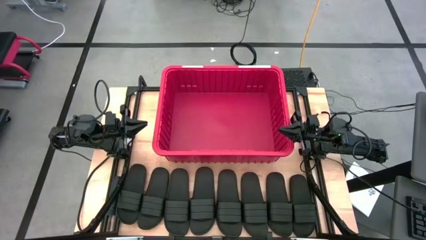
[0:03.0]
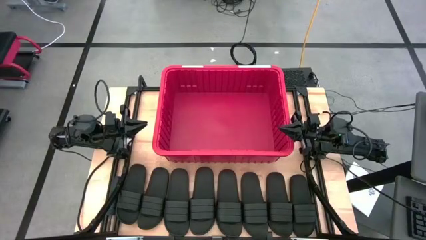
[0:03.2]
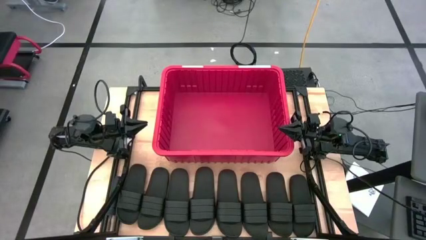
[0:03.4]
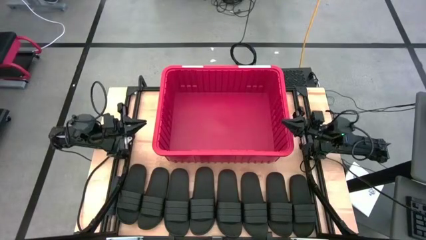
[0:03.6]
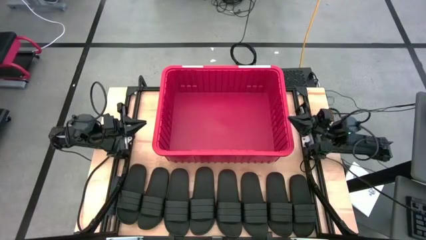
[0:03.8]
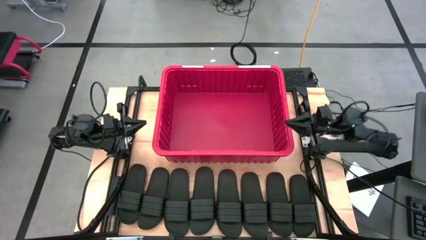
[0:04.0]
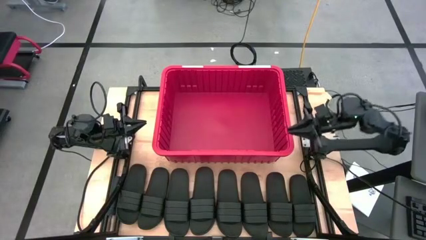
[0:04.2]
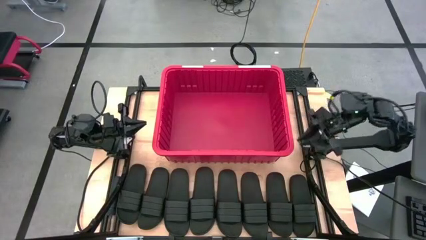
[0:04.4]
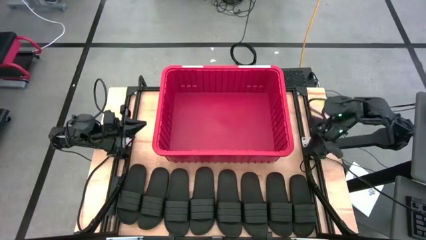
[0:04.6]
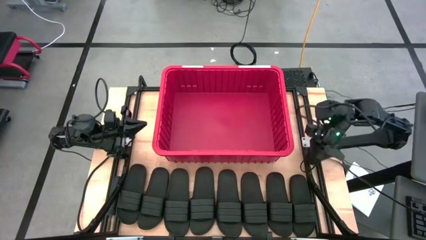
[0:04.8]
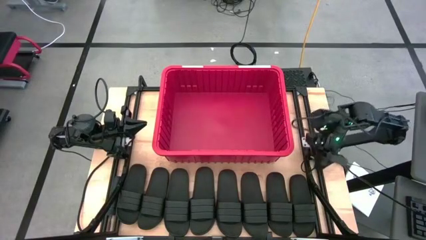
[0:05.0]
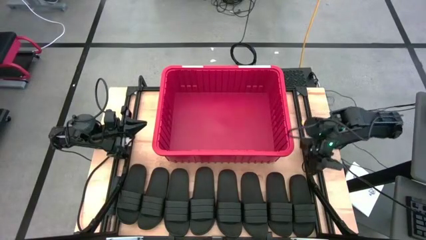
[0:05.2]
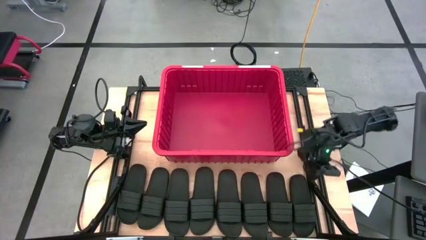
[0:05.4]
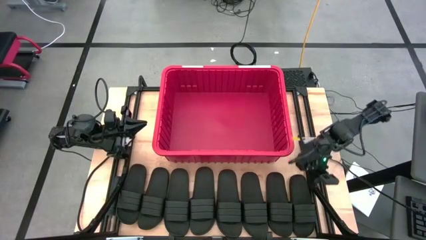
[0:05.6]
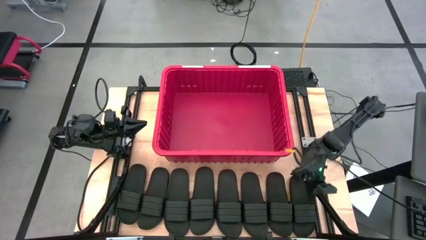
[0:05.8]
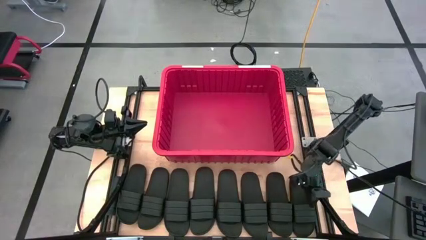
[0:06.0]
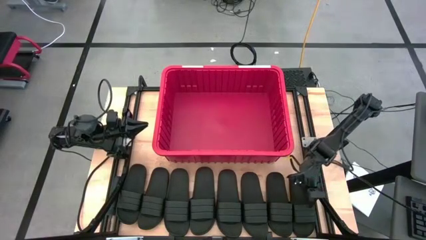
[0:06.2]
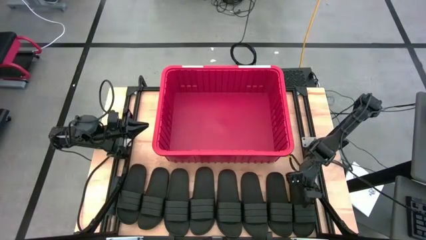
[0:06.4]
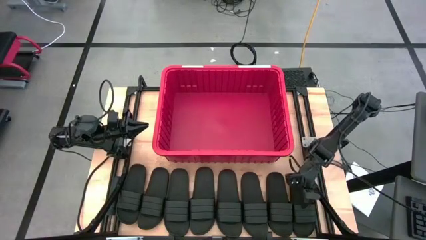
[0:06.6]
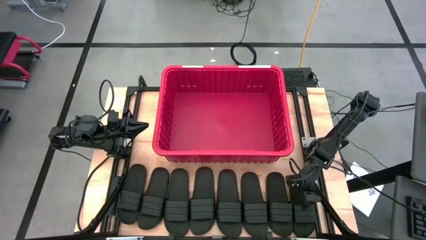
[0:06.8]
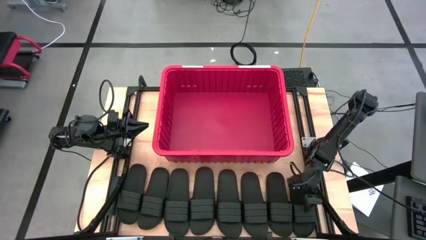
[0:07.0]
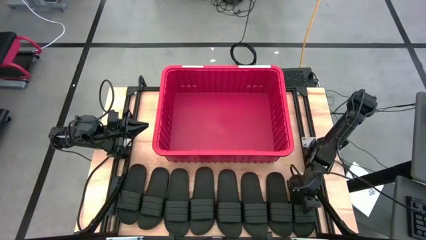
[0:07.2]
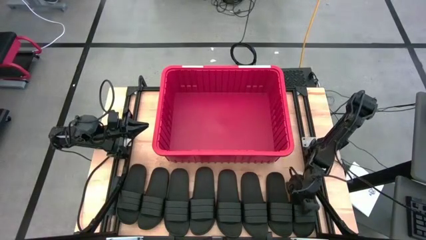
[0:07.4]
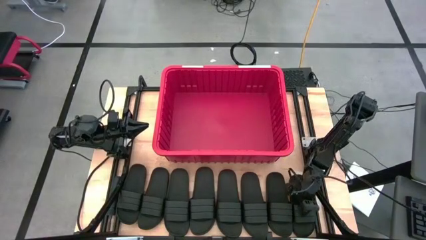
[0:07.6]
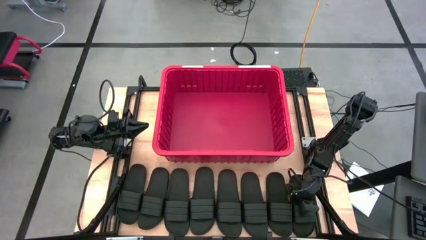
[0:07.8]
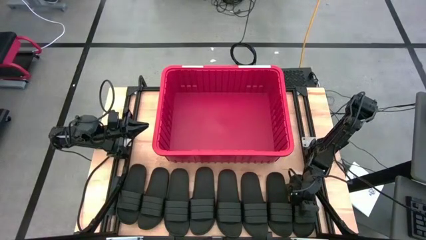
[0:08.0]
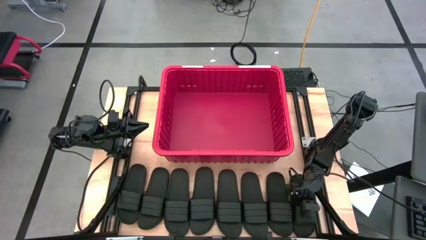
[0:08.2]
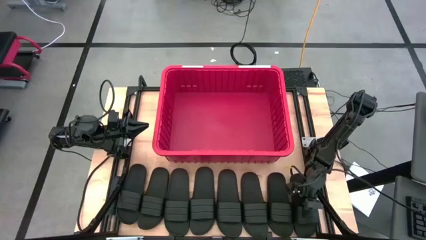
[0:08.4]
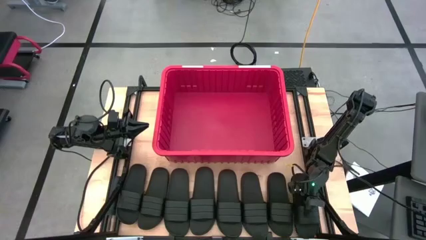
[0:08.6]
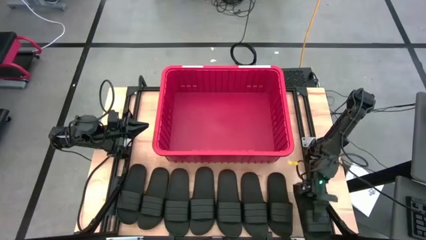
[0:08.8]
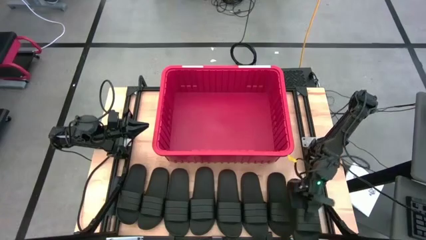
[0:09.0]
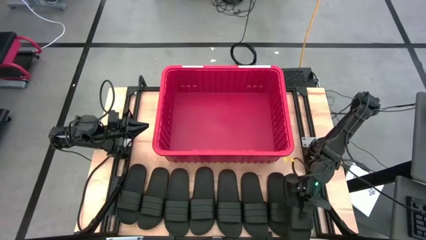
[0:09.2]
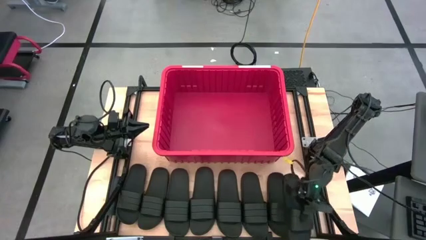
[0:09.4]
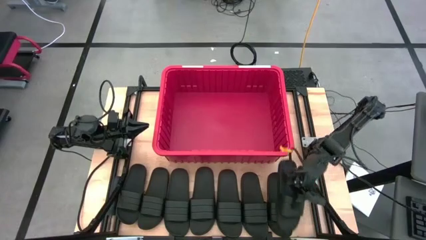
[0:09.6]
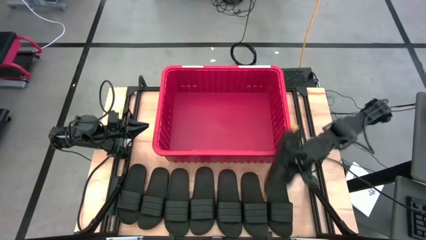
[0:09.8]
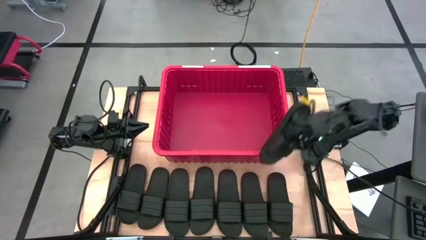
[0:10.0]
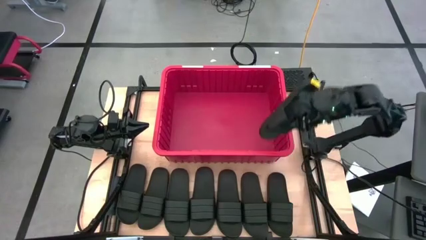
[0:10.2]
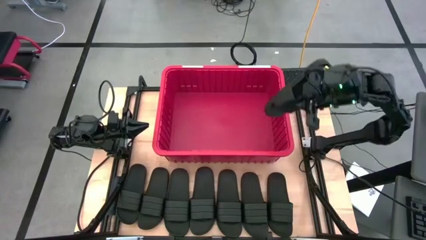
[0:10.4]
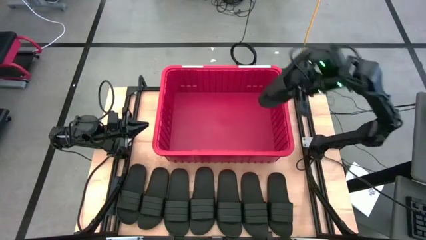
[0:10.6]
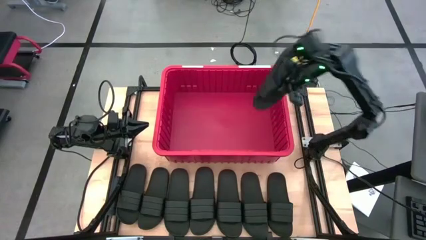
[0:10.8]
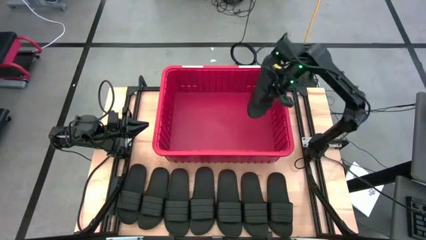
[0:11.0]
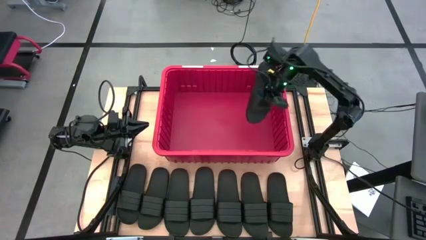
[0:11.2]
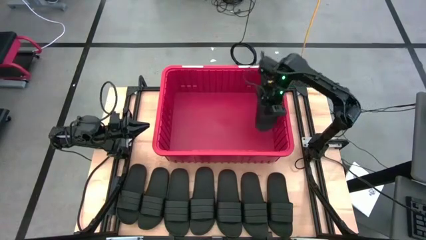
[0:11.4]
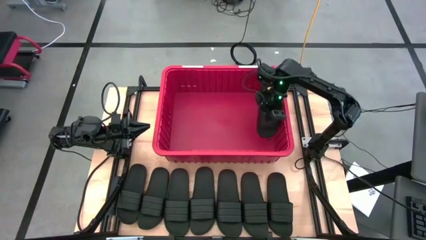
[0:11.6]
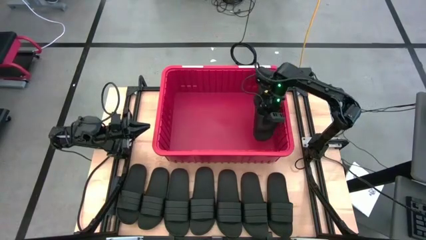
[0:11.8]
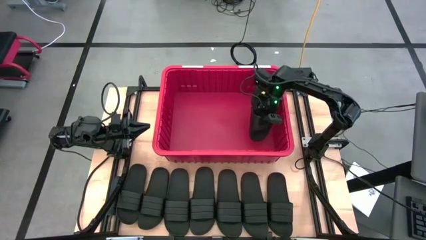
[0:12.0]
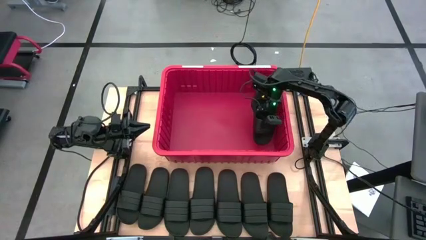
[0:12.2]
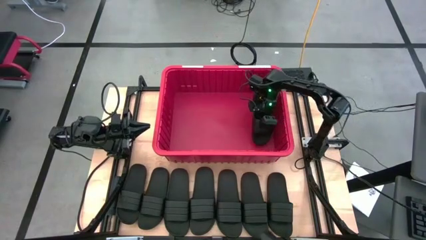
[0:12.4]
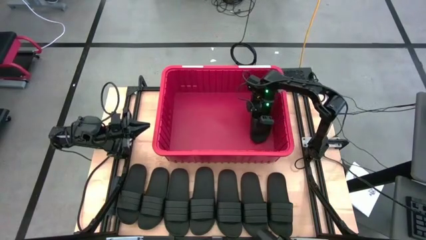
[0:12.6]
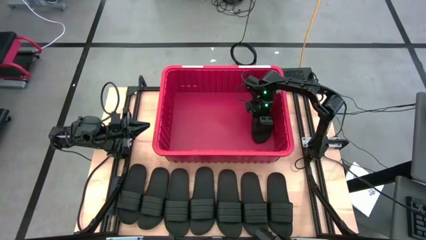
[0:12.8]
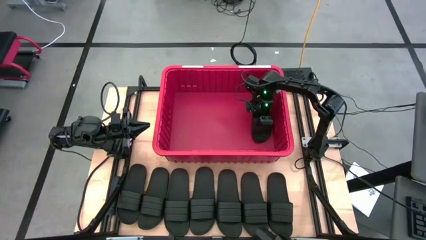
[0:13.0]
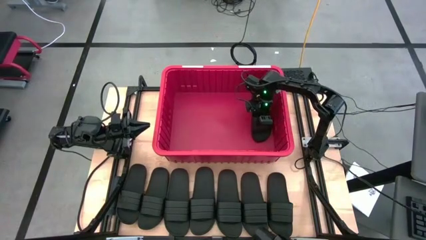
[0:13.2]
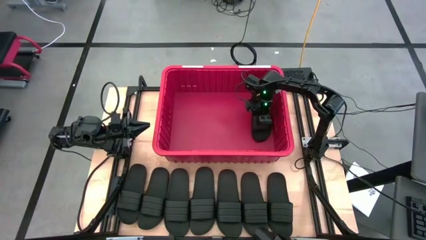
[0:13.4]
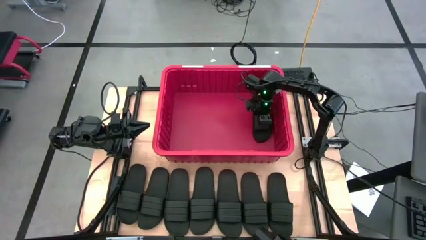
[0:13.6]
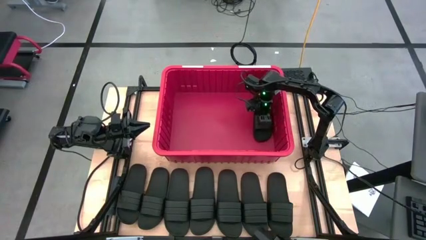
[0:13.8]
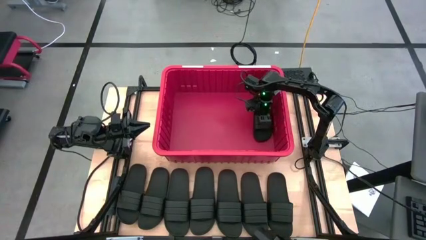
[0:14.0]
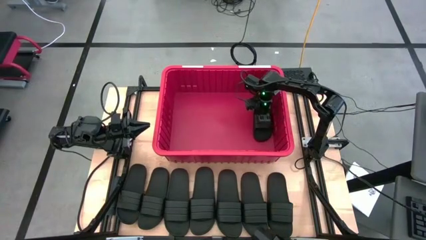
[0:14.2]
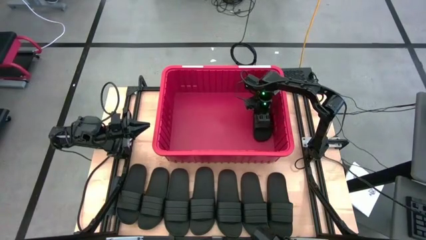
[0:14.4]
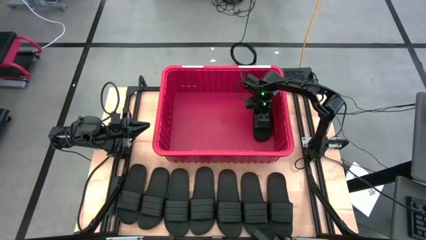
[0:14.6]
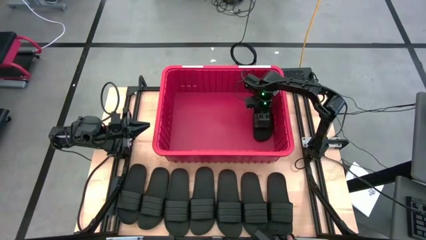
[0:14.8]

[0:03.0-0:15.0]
Task: Pick and place slides into bin
Put the black slides into the red bin

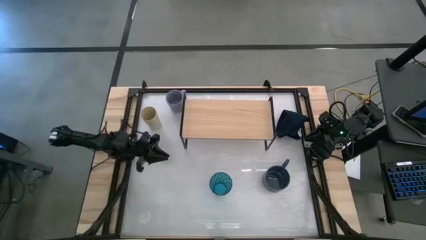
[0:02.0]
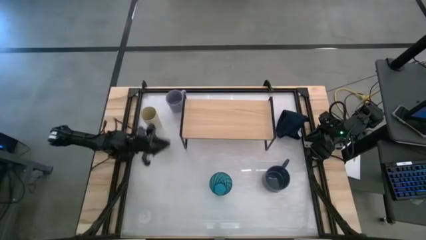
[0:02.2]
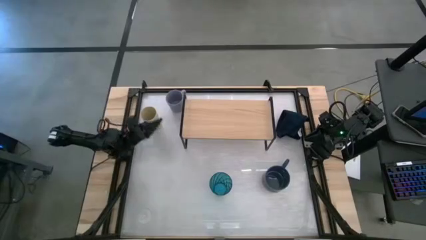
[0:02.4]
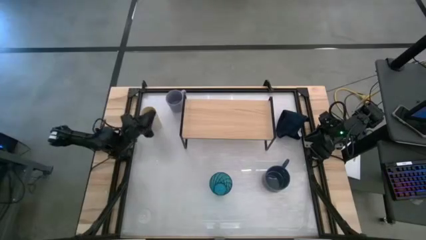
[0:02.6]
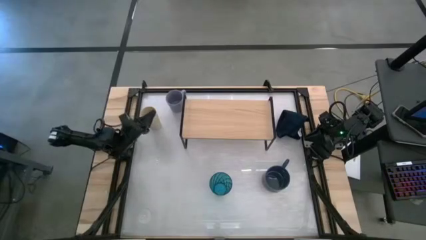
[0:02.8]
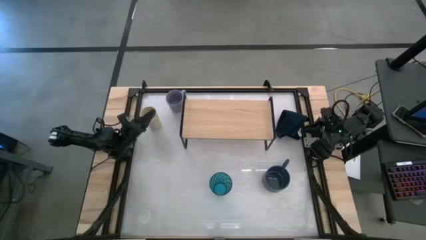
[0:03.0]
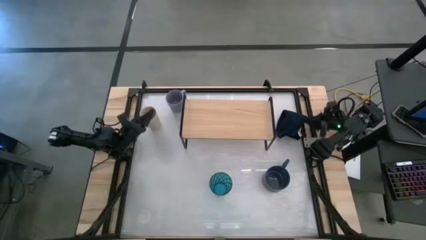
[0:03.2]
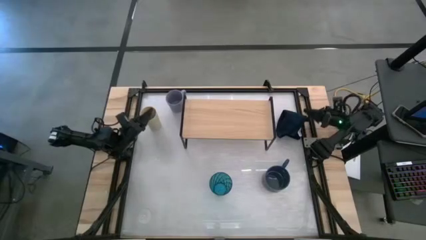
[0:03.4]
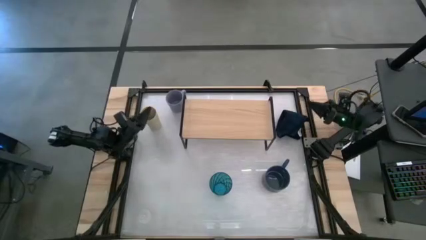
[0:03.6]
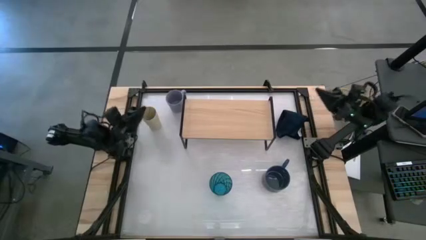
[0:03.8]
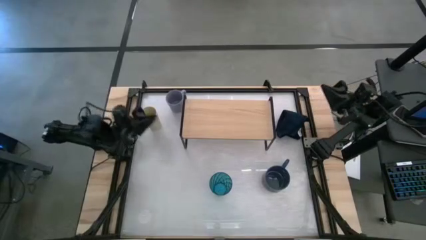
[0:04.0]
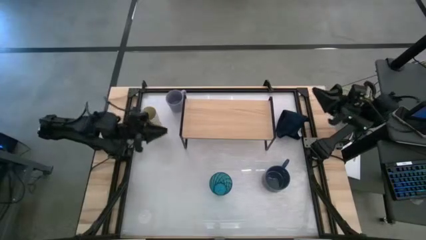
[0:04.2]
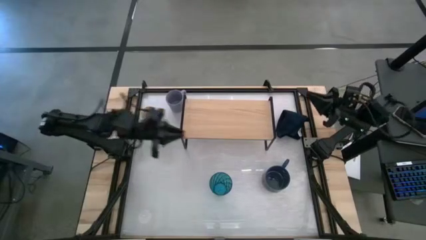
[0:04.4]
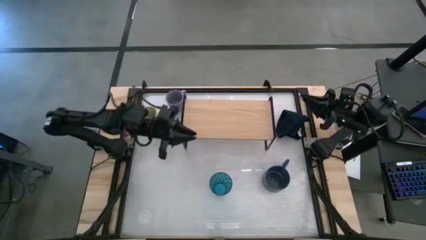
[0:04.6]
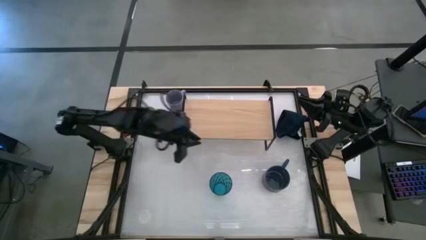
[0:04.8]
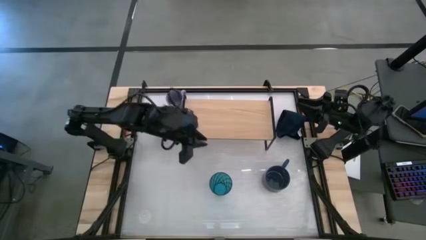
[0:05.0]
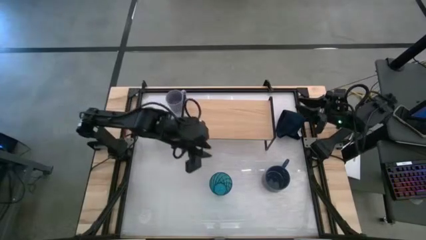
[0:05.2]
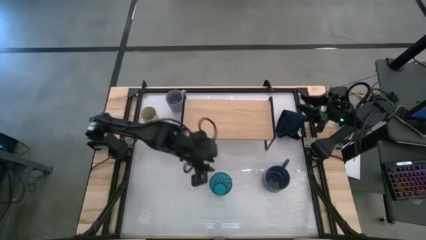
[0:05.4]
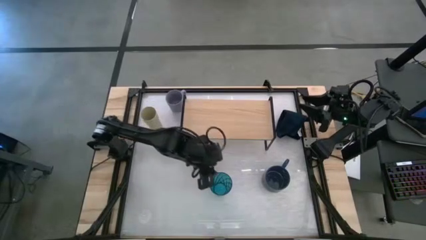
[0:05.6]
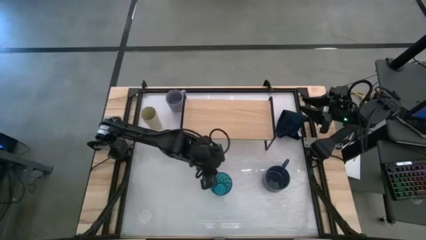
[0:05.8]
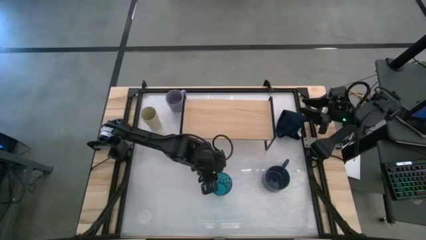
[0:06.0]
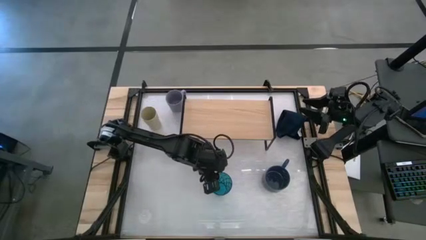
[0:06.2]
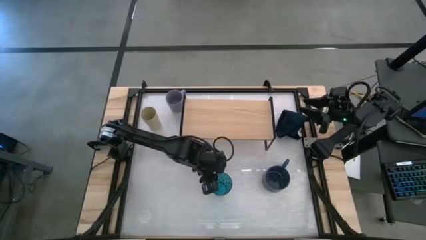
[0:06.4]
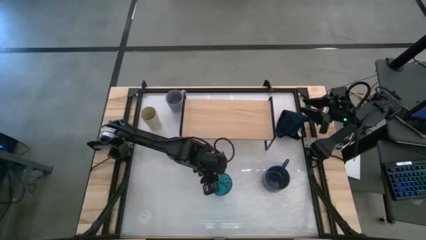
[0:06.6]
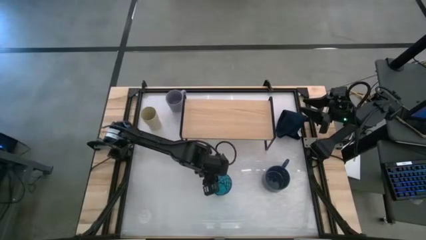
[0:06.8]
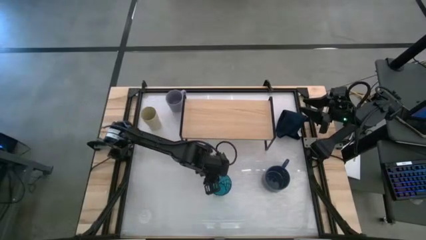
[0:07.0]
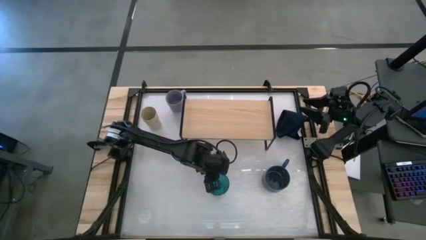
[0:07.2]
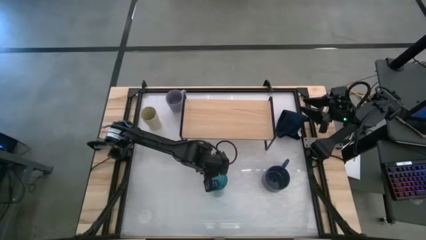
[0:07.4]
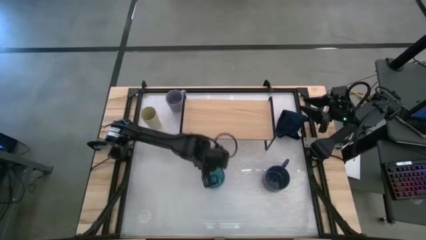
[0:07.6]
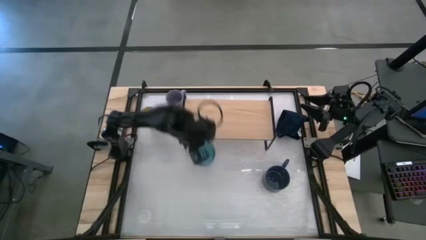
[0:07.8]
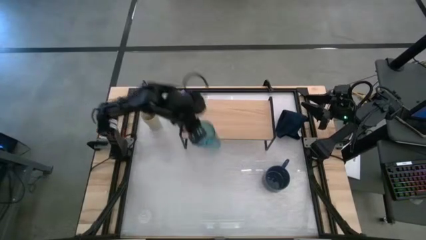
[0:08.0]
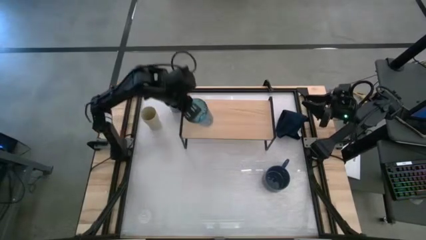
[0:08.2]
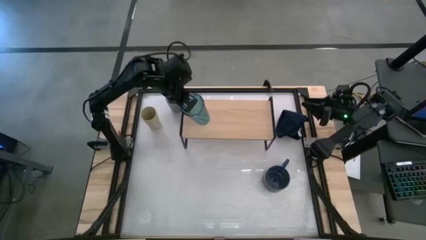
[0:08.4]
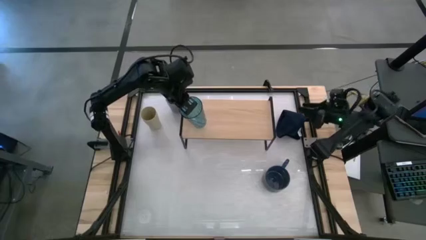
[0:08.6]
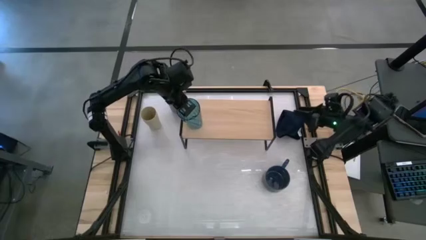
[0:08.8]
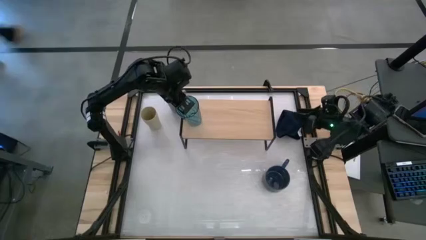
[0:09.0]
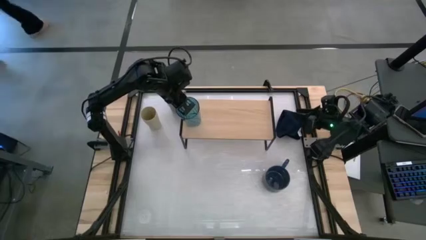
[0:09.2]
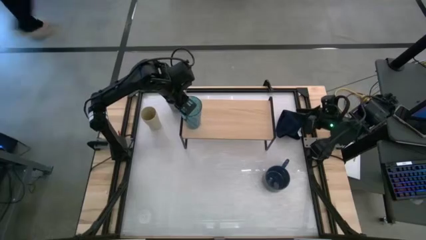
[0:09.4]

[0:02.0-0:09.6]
Task: Stack small to large cups/mugs on shelf
Put the light blue glass on the shelf
